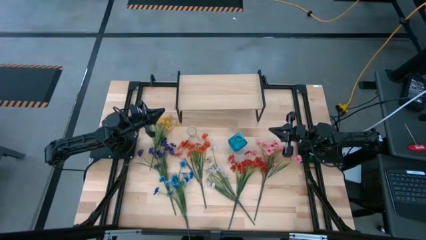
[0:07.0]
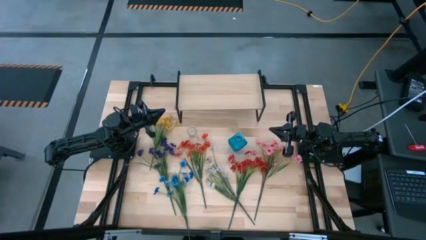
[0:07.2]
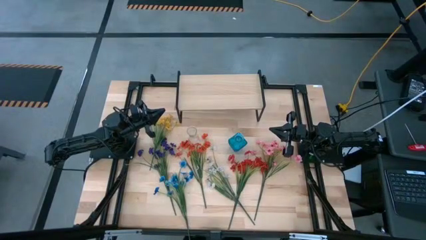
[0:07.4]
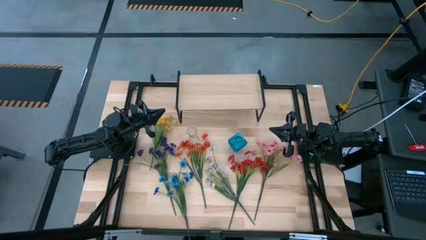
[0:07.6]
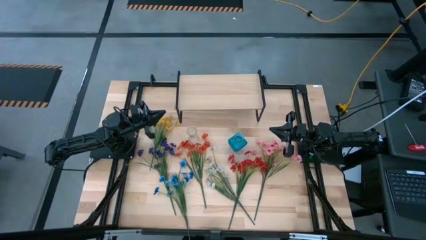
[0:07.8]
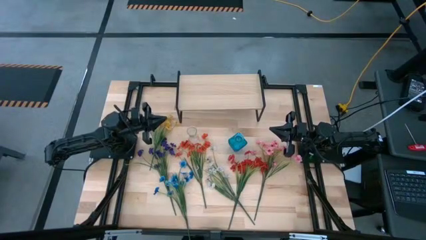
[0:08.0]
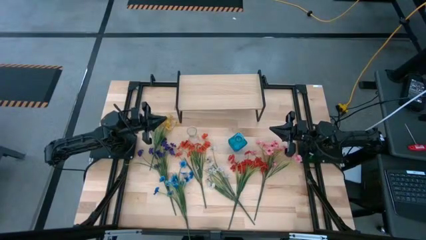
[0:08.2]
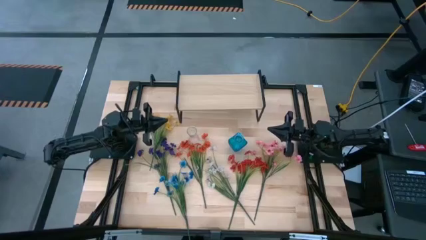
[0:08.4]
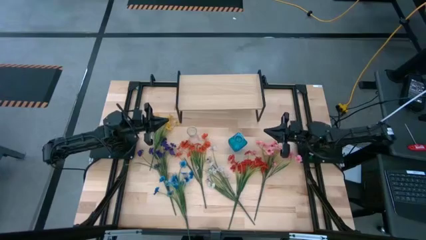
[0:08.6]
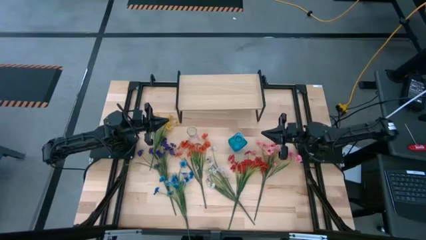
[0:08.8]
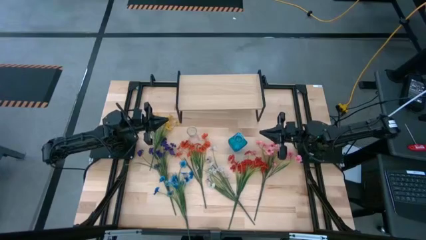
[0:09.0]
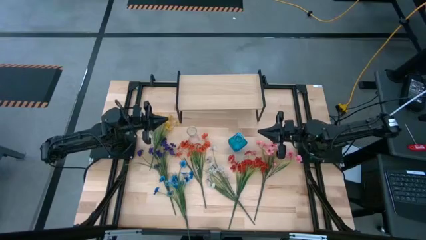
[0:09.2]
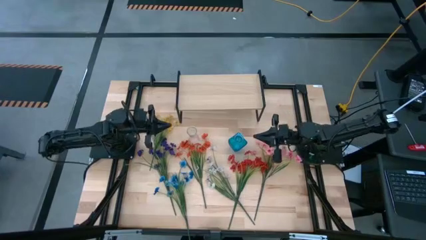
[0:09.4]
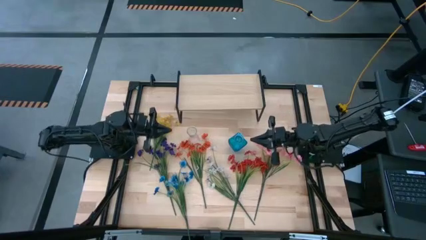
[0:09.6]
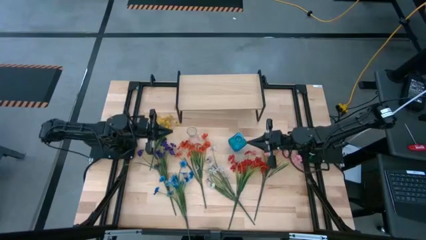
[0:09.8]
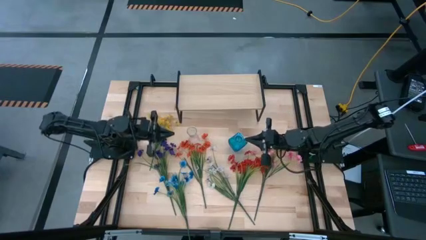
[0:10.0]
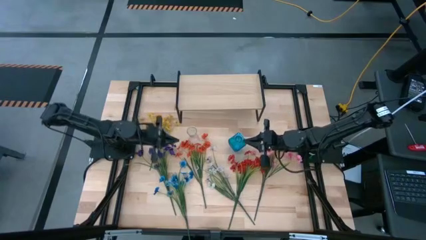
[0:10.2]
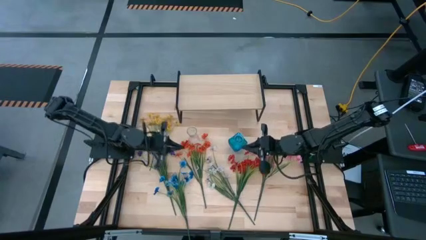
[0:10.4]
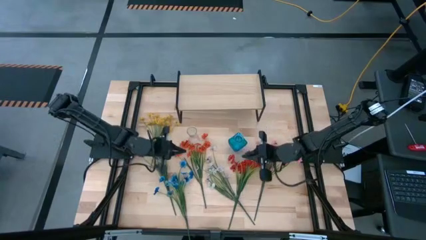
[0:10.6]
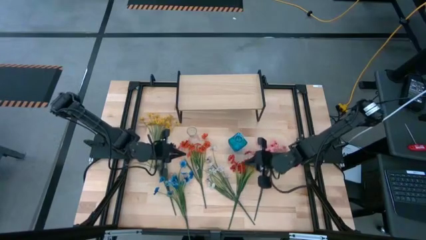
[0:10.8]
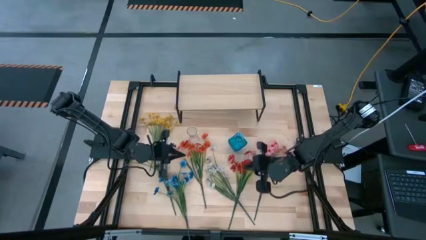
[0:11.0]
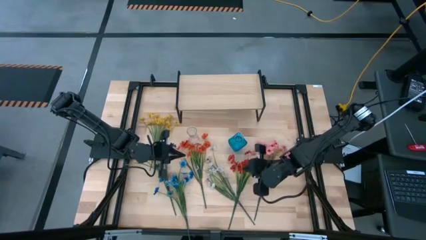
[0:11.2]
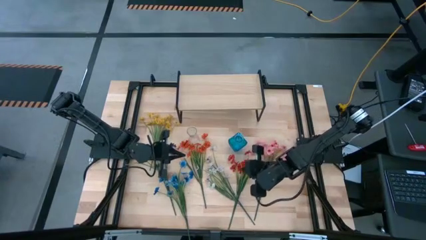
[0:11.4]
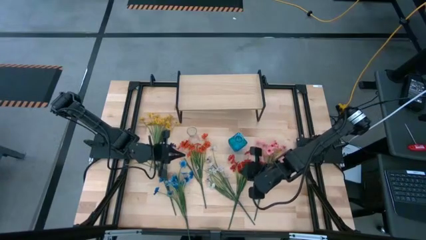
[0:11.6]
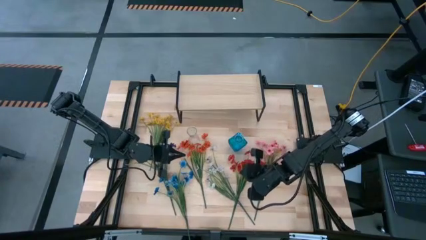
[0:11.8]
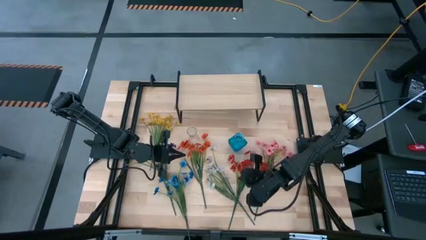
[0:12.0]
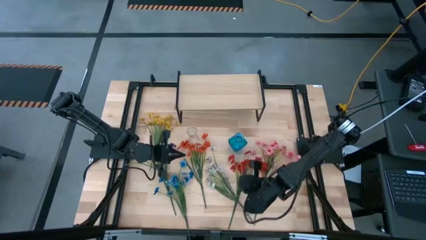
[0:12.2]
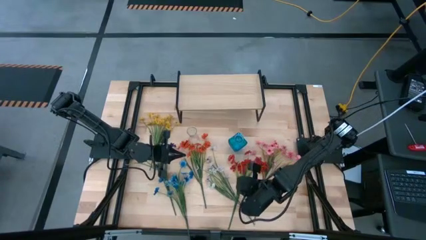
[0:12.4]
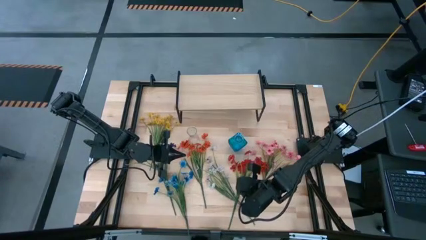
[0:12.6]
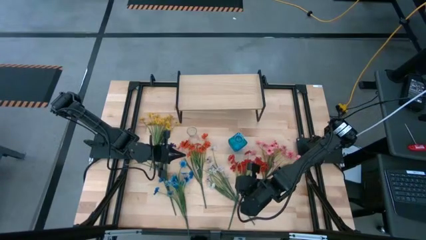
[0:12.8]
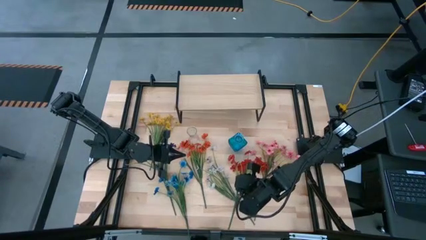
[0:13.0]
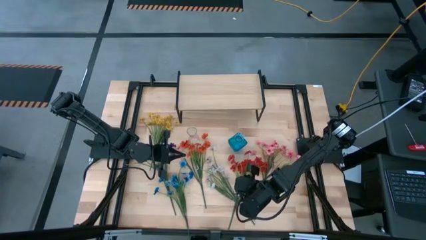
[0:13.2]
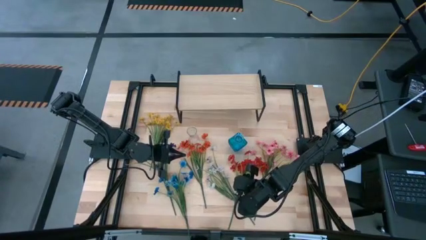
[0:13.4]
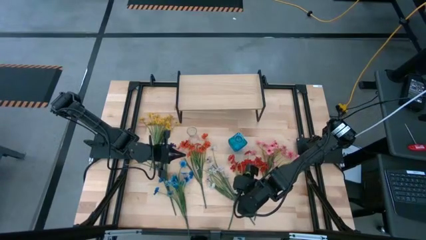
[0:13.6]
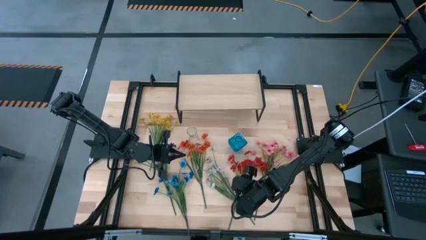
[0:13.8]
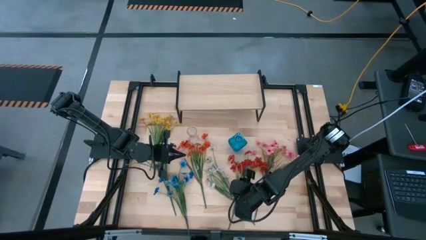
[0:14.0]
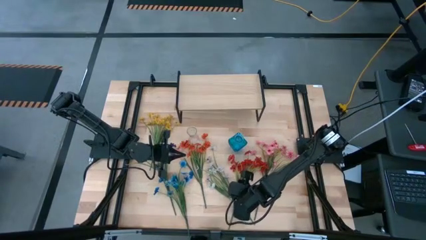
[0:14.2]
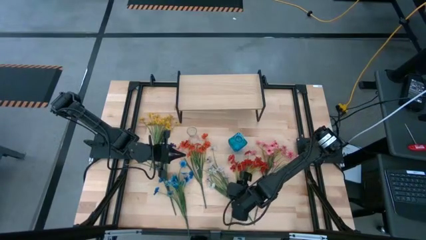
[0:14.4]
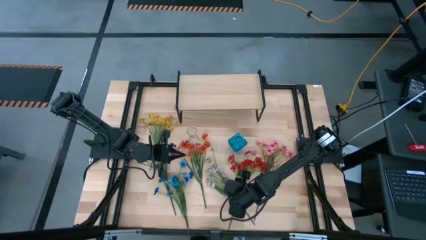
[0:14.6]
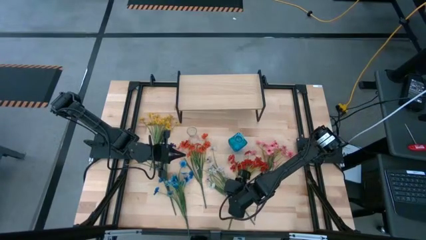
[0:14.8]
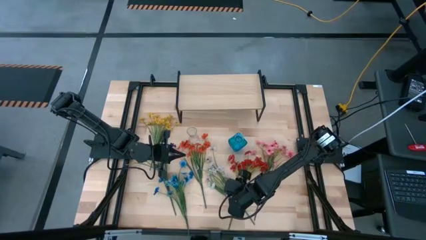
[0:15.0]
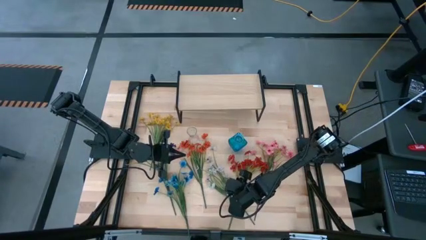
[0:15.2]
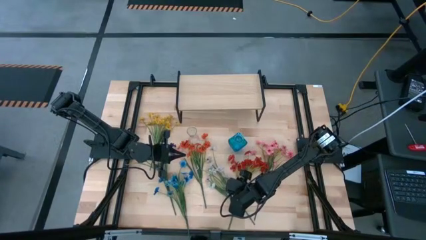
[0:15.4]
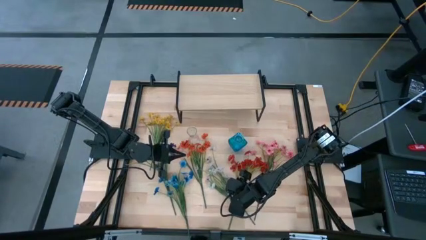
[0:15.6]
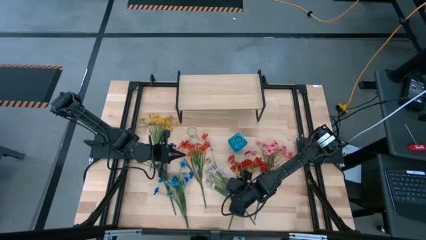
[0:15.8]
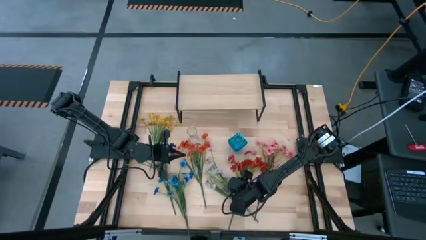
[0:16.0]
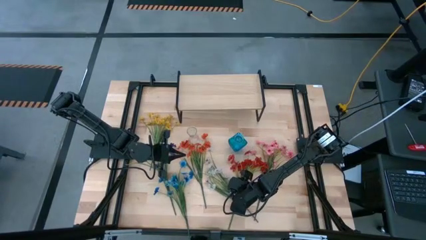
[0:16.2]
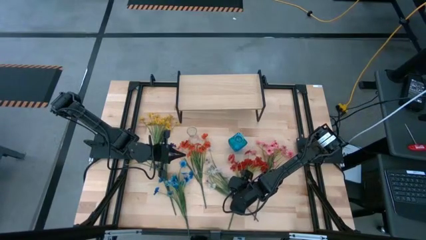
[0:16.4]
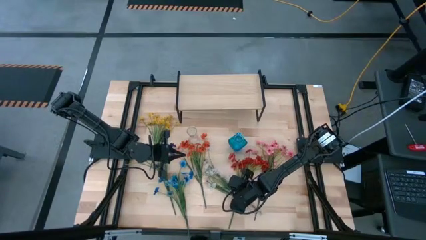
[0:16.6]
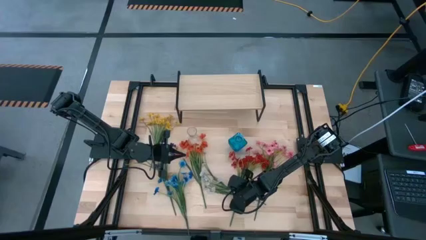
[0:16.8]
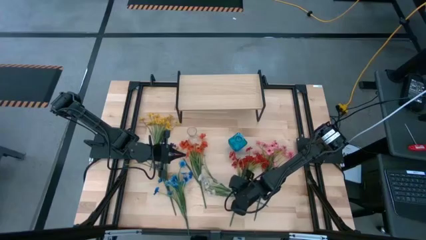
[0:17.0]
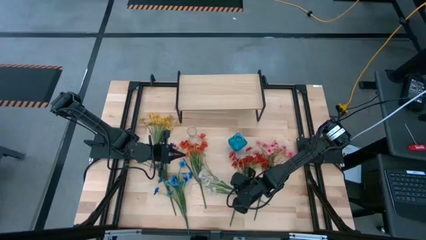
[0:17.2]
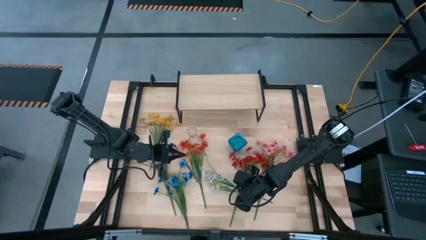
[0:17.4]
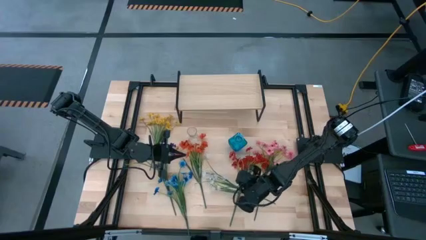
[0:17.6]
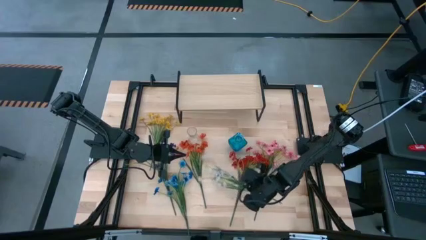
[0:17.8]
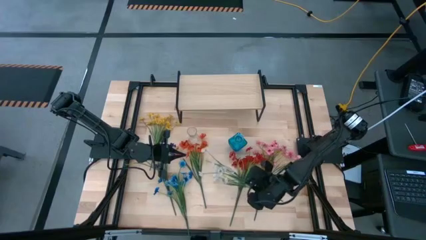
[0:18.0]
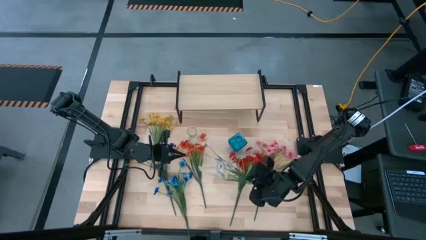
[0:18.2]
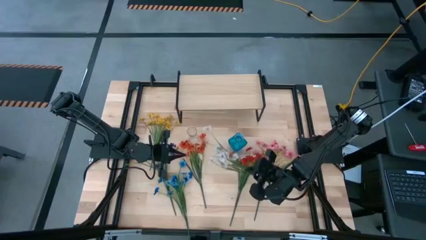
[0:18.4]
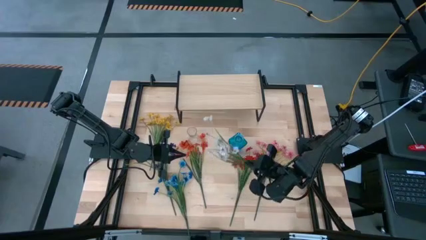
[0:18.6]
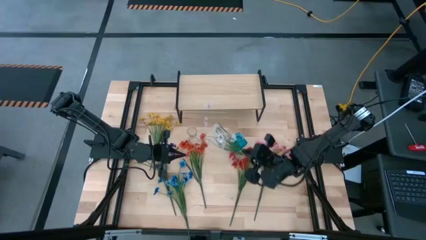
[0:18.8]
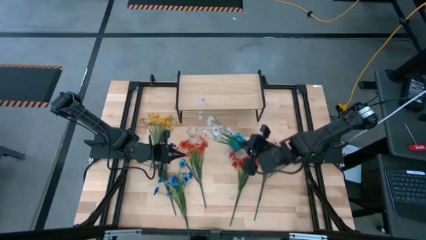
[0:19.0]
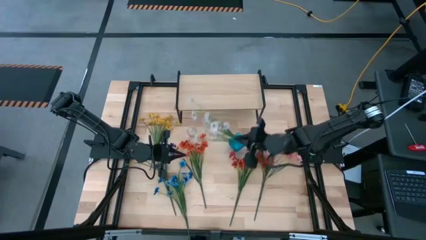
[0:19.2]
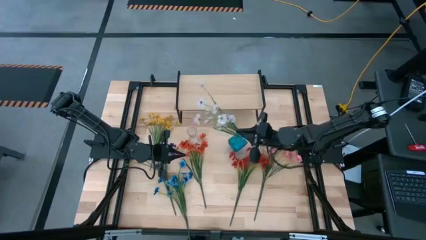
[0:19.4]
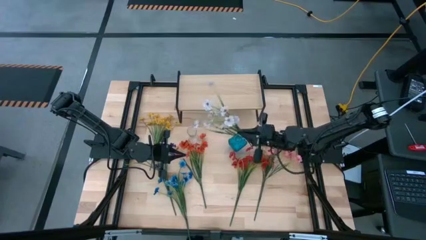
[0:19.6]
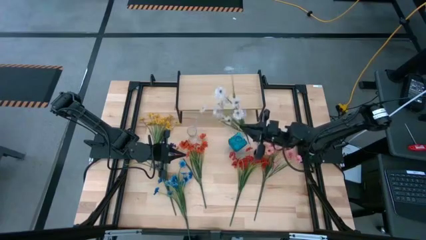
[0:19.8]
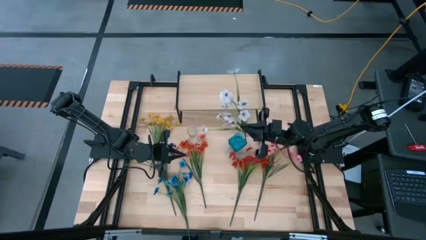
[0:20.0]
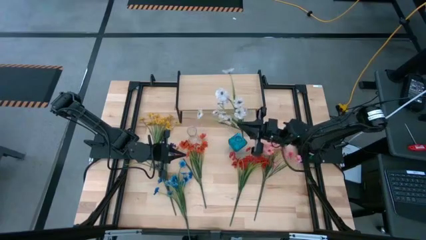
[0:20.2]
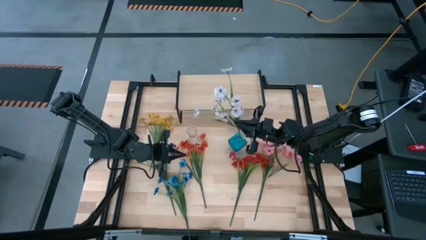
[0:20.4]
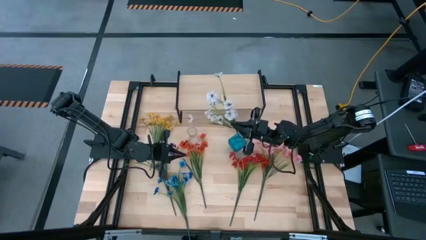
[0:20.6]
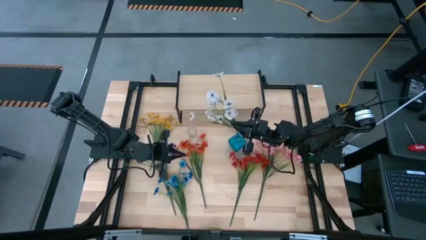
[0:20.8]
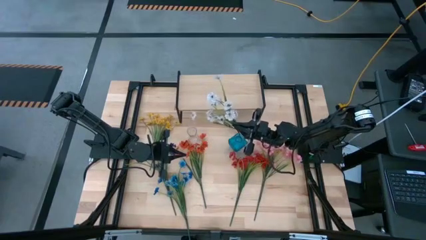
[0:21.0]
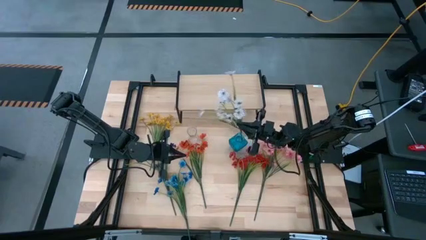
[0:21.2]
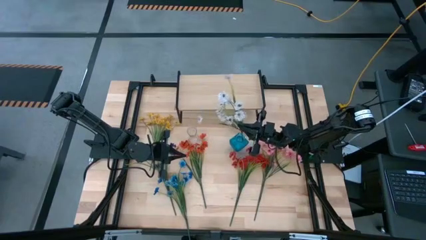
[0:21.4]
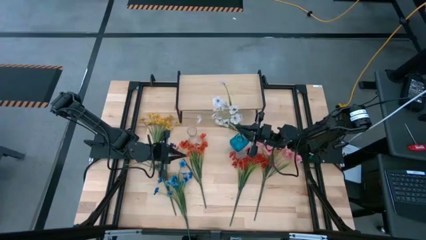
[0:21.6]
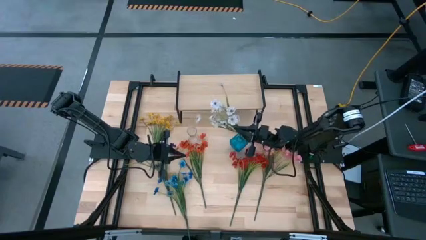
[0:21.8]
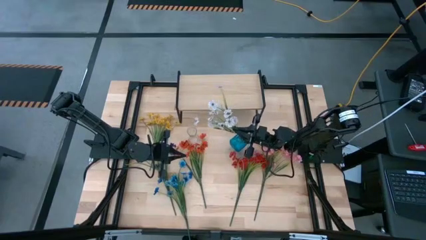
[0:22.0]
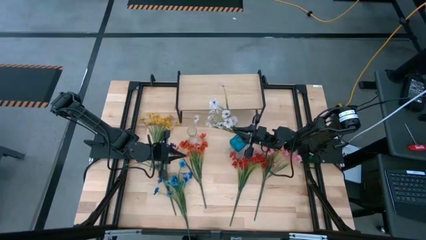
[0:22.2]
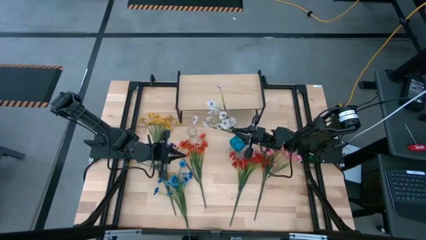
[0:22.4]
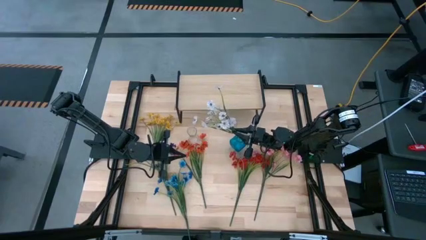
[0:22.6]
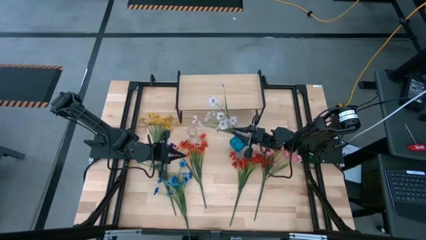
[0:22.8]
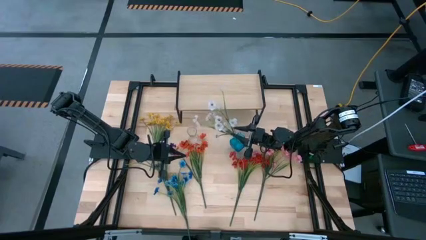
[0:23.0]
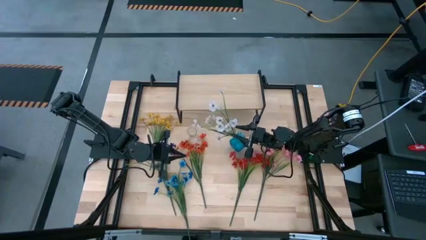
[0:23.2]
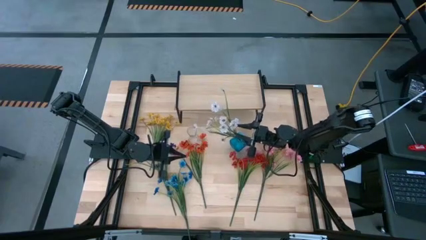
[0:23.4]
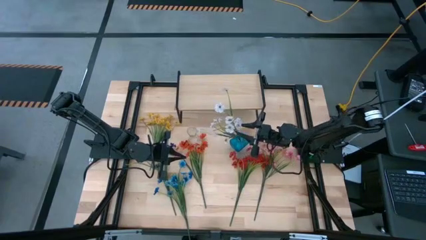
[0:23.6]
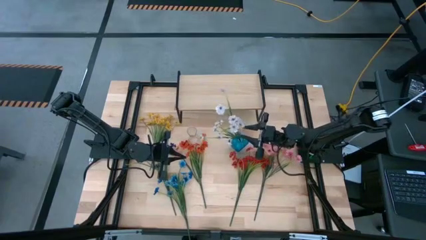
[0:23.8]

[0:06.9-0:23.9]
Task: Pick and place flowers into a vace then onto a shelf
Put the white flowers into the blue vase
